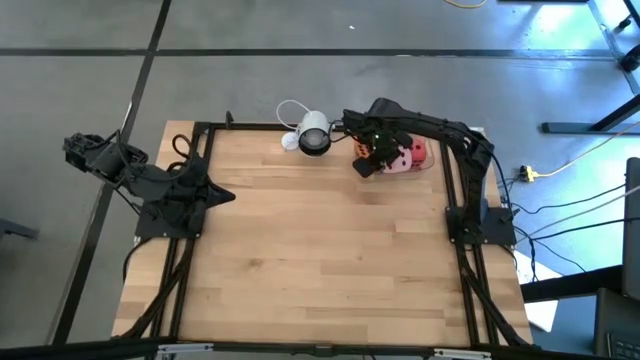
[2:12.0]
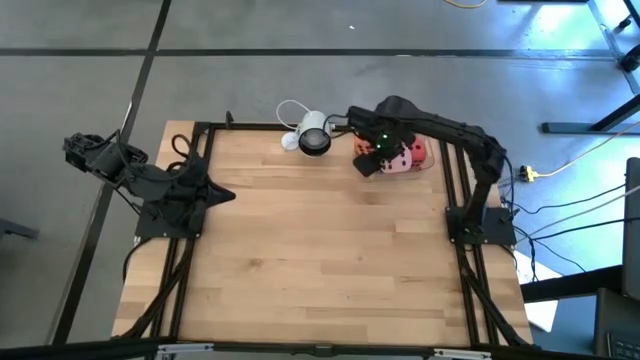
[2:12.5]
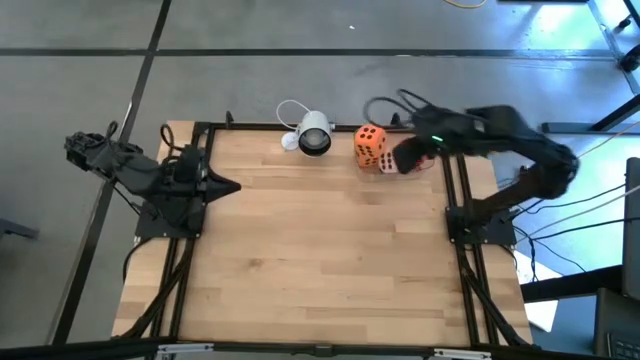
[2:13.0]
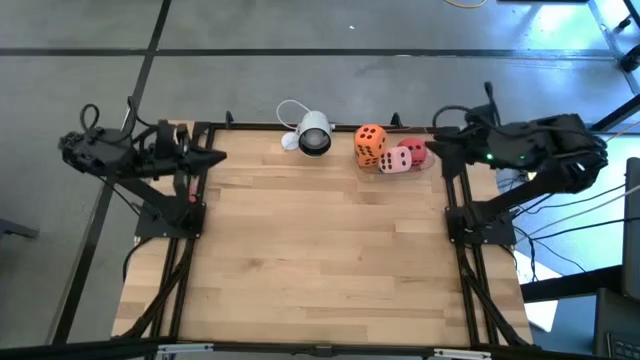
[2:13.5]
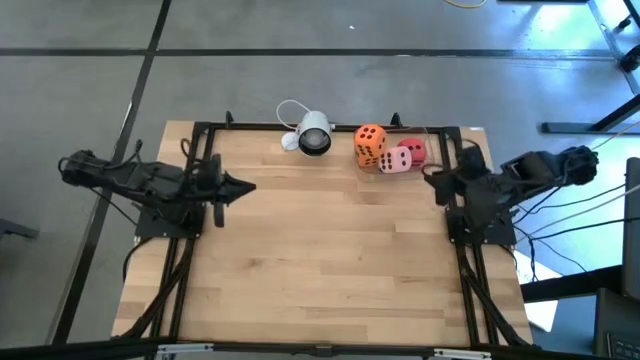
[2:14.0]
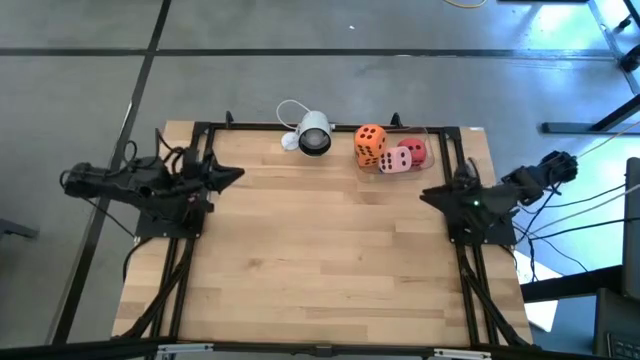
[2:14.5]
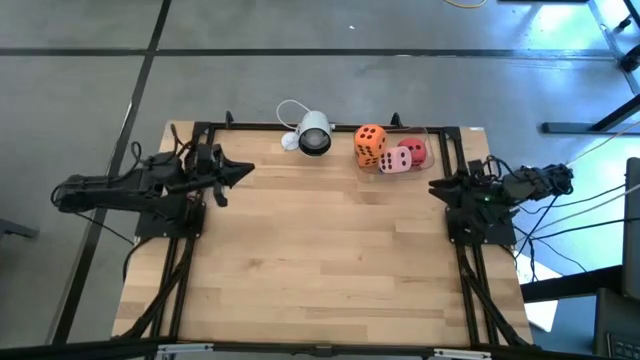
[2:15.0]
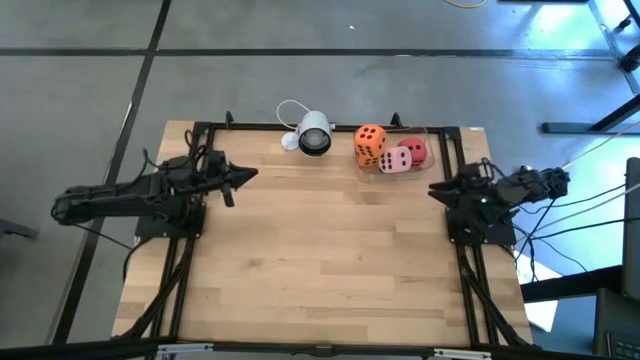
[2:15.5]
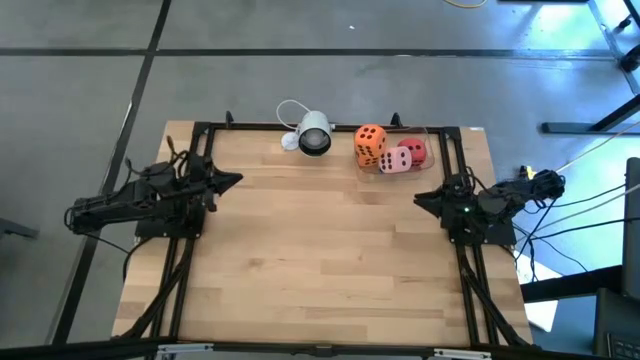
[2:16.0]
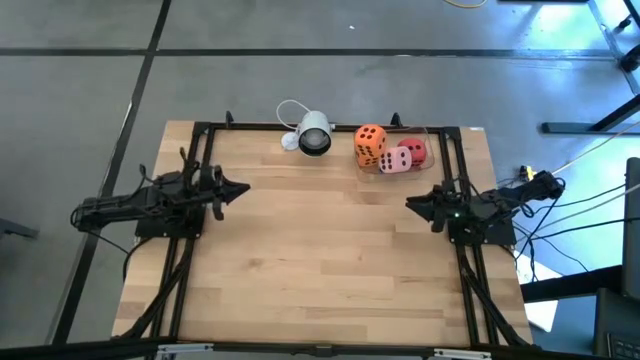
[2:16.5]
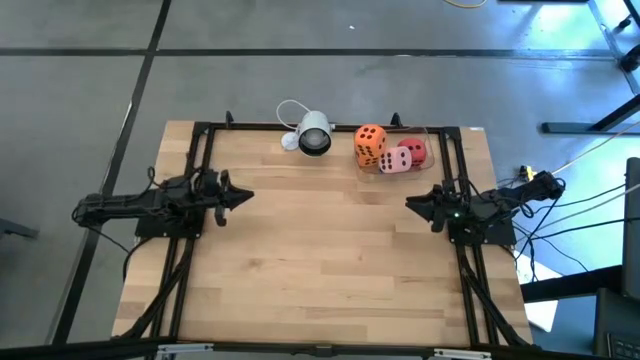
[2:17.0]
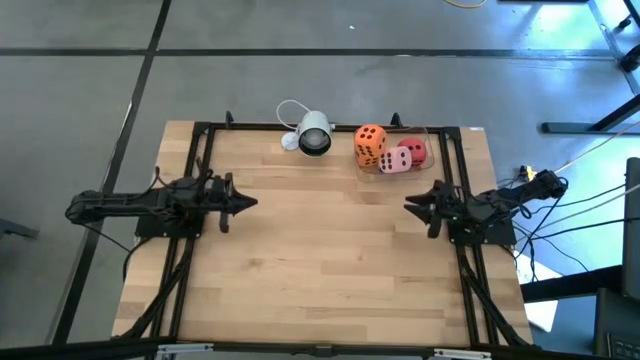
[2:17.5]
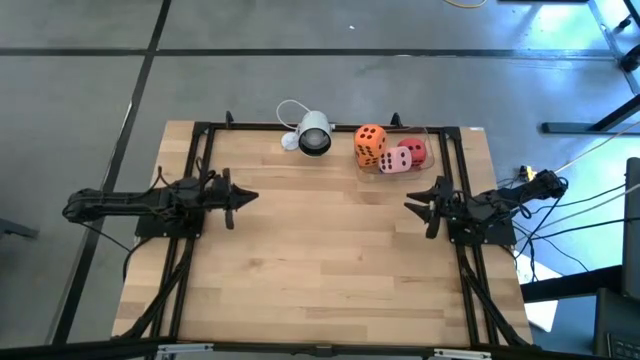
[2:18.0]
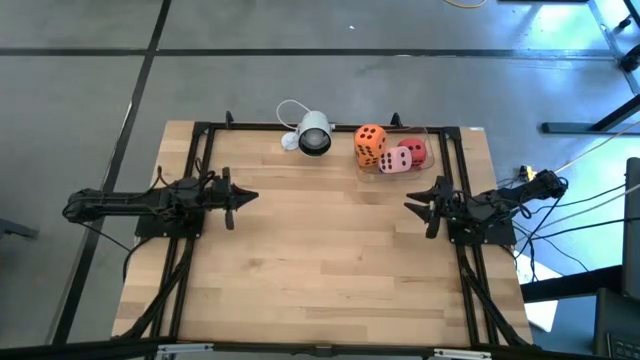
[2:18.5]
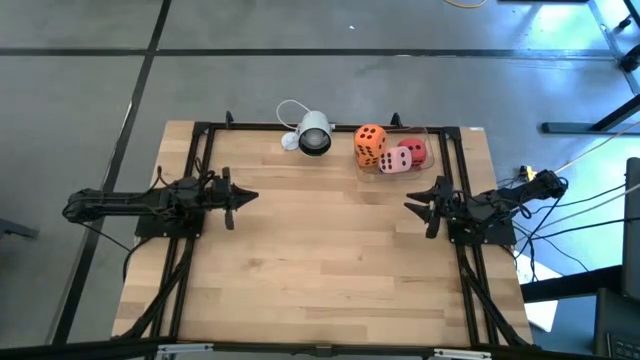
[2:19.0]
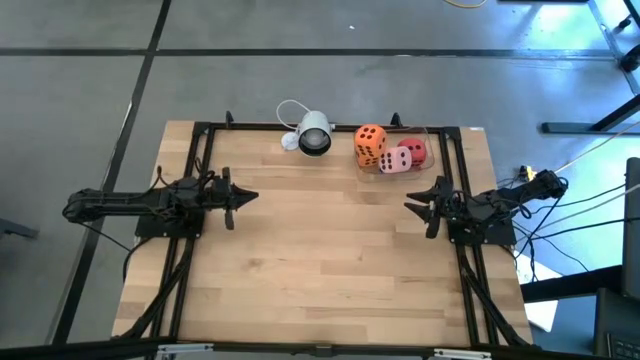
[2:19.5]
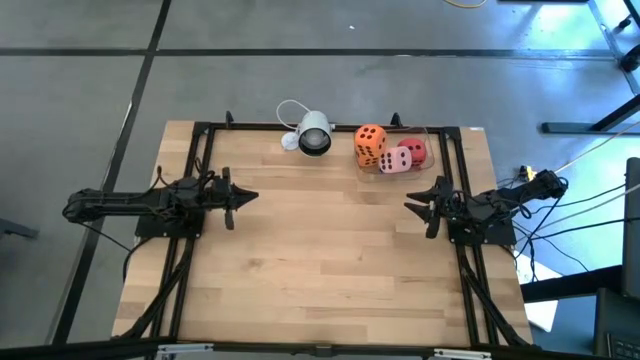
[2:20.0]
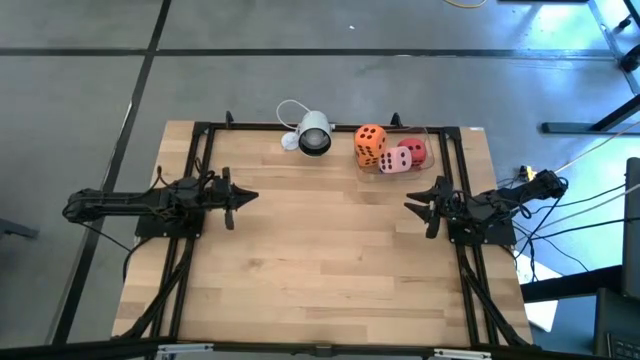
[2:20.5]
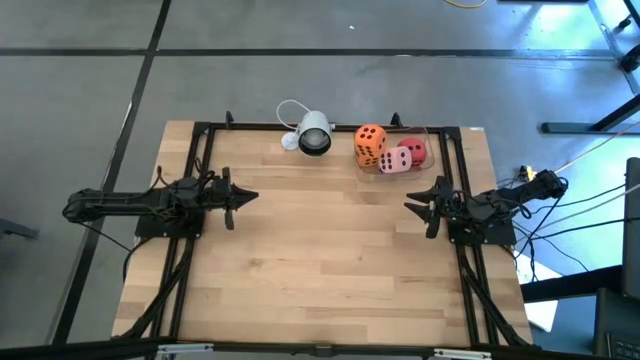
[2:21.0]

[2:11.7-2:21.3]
Task: Pick & Place Dice
Return to Home Position

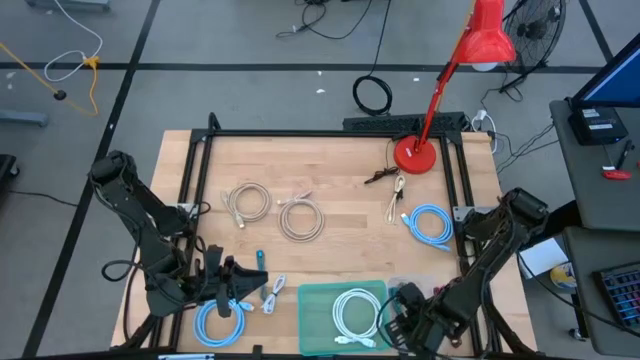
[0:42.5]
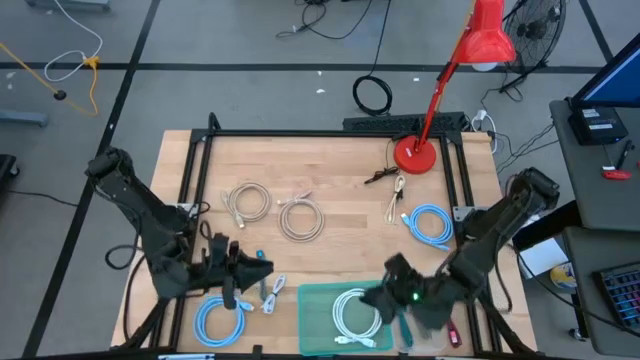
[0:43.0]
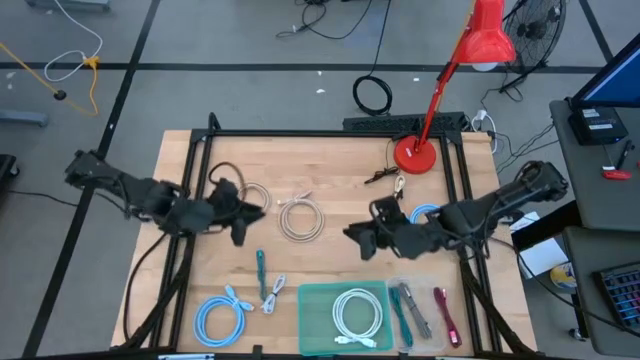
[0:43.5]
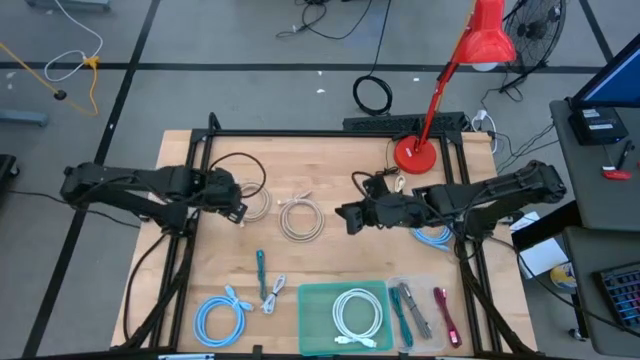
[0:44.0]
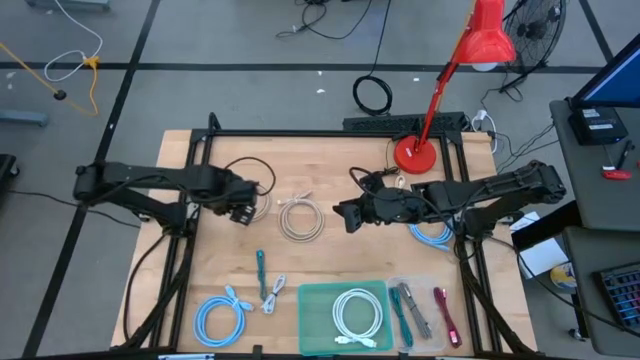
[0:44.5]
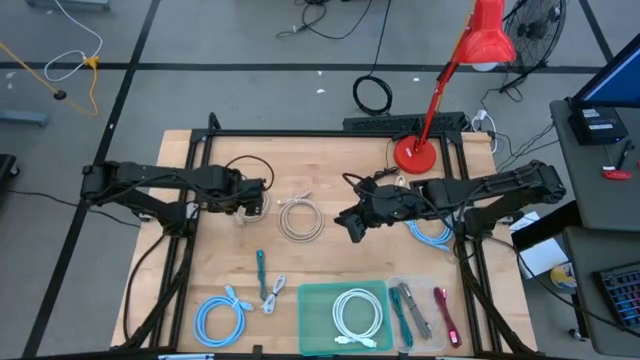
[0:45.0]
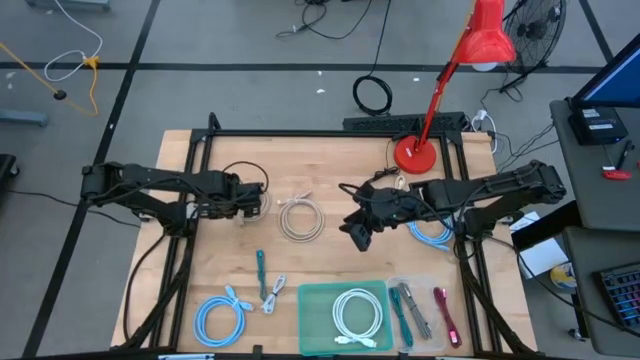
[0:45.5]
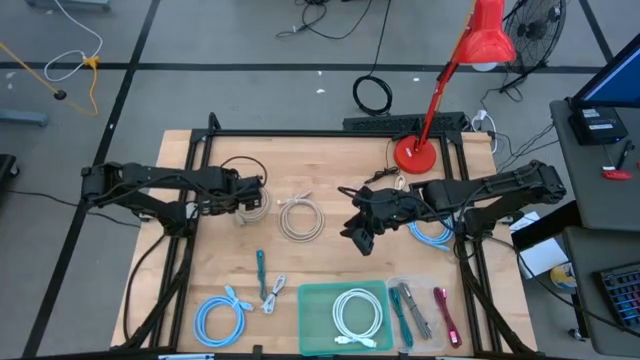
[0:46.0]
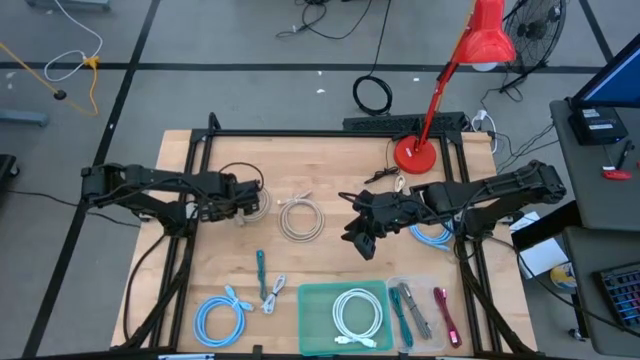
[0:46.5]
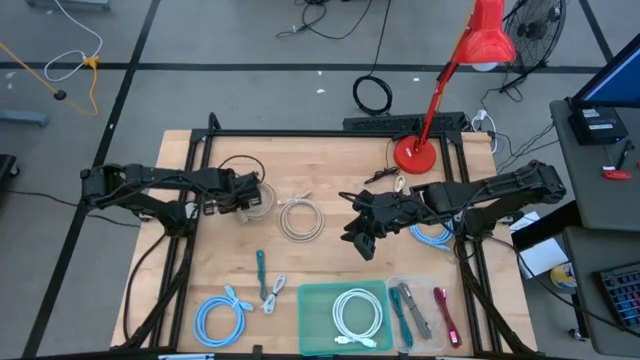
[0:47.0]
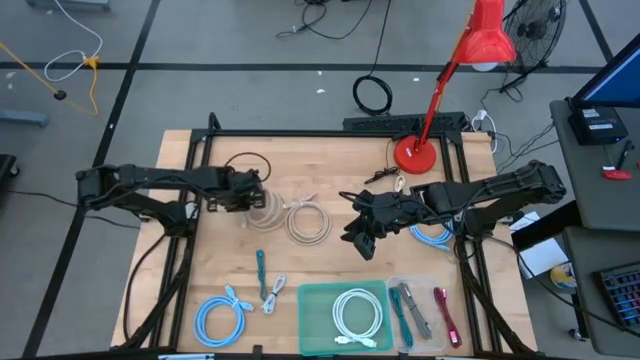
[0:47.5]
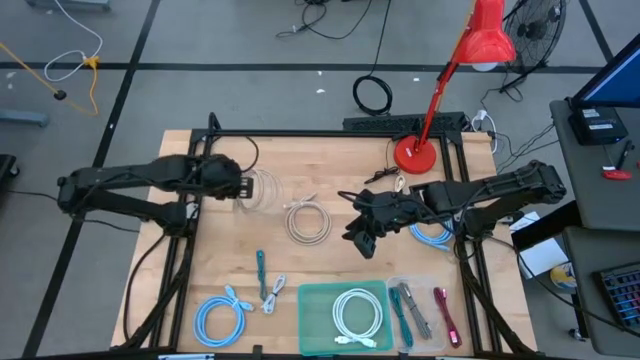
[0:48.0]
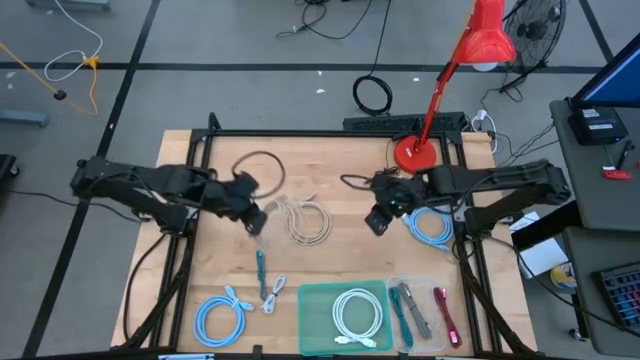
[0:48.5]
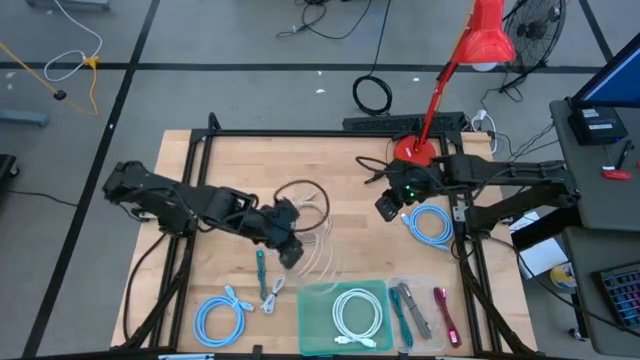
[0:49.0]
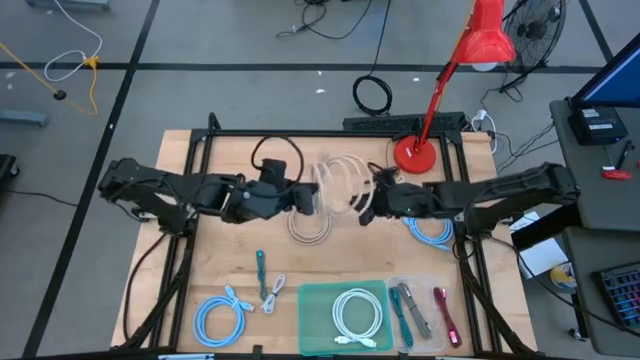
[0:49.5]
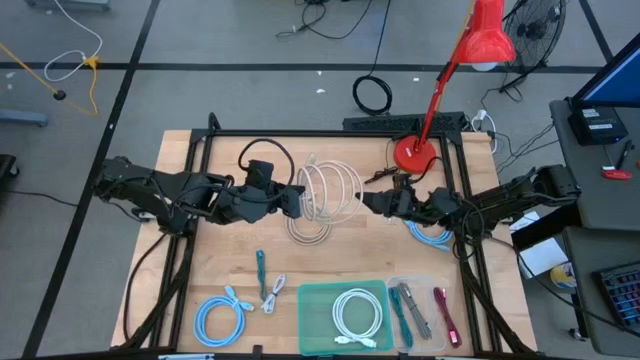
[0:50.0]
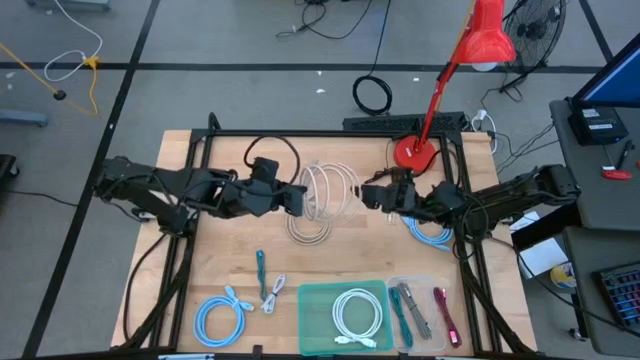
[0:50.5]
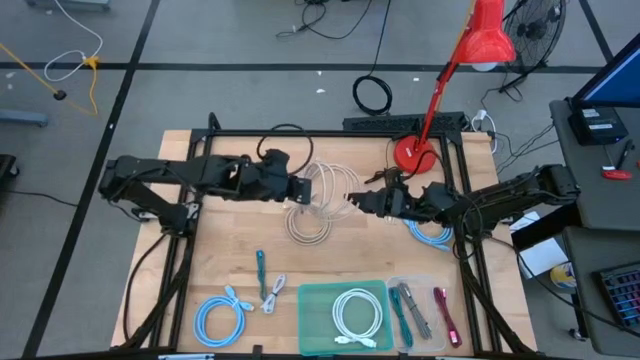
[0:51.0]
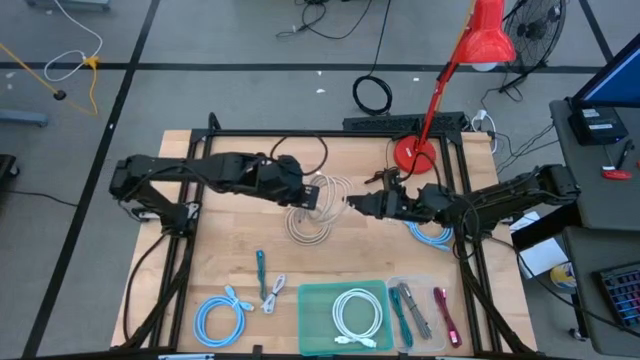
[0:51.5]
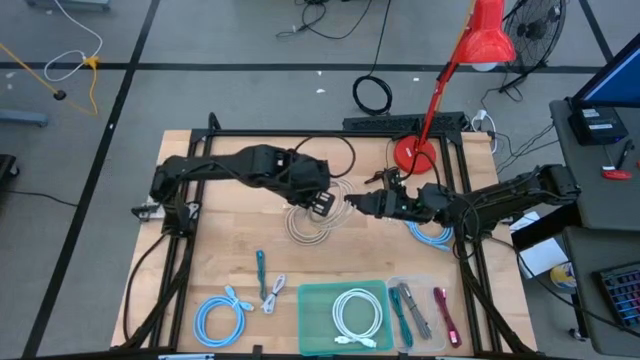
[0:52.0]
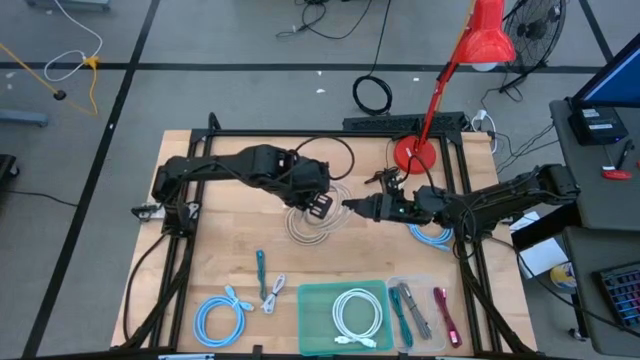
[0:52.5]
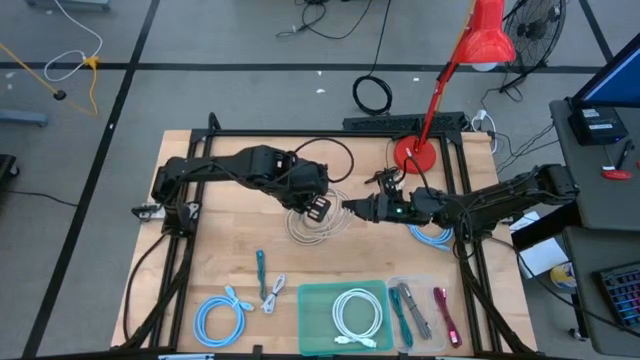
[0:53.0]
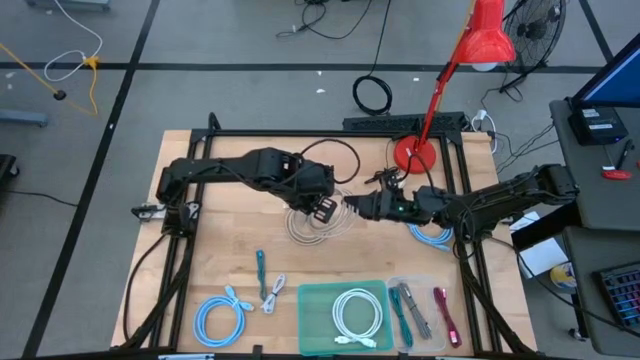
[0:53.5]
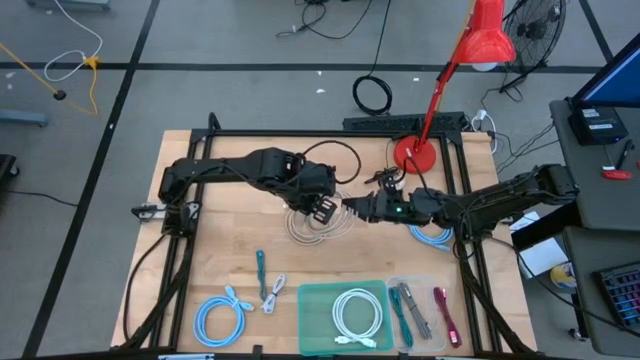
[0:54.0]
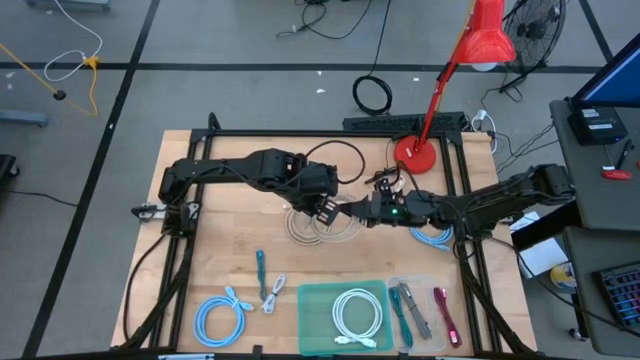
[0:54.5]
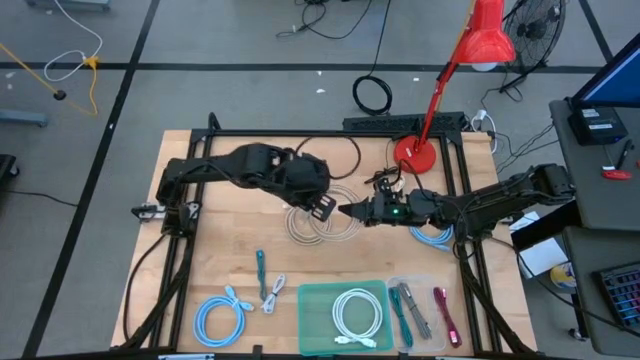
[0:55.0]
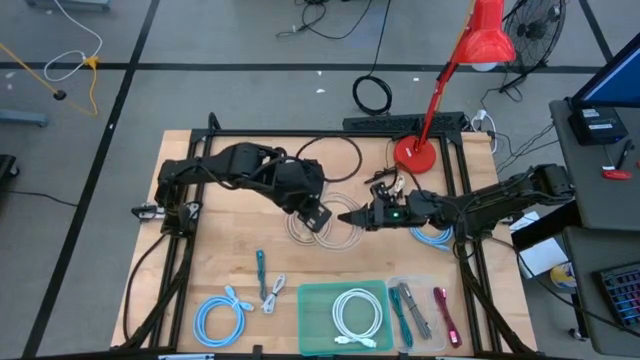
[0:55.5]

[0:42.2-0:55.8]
Task: Pick & Place USB Port
Put the left brown hdmi cable into the green bin
